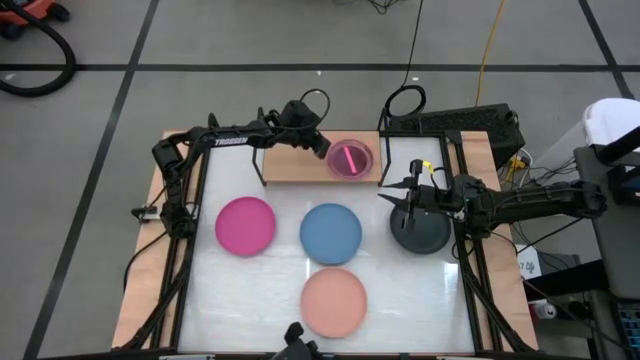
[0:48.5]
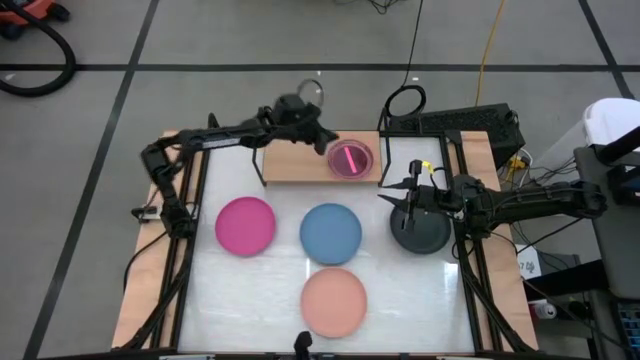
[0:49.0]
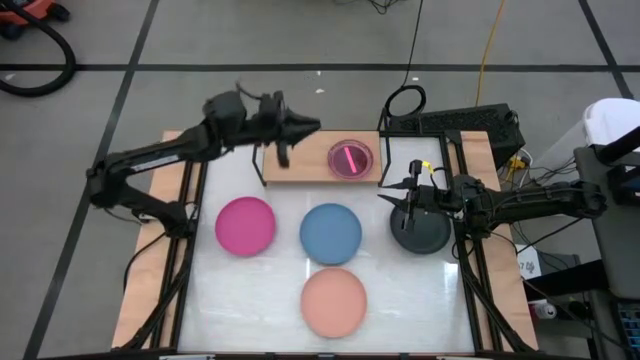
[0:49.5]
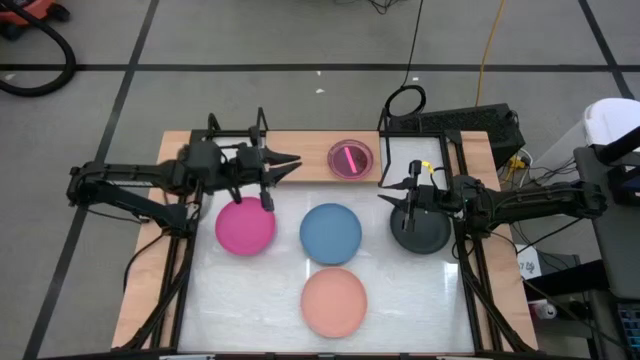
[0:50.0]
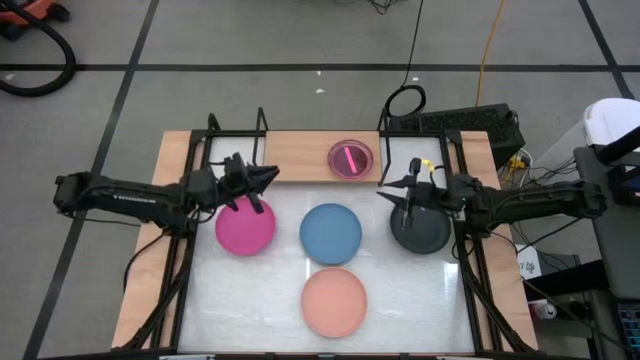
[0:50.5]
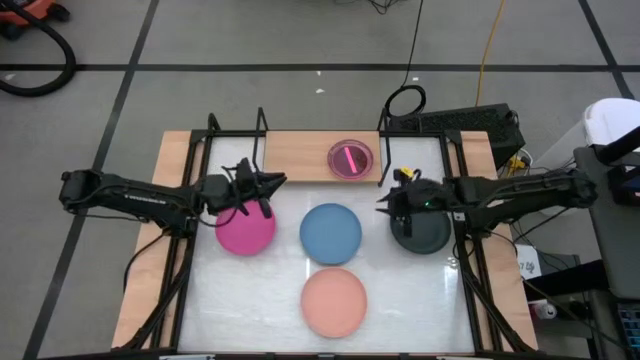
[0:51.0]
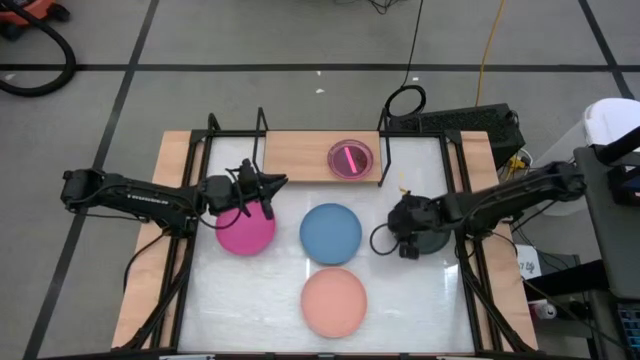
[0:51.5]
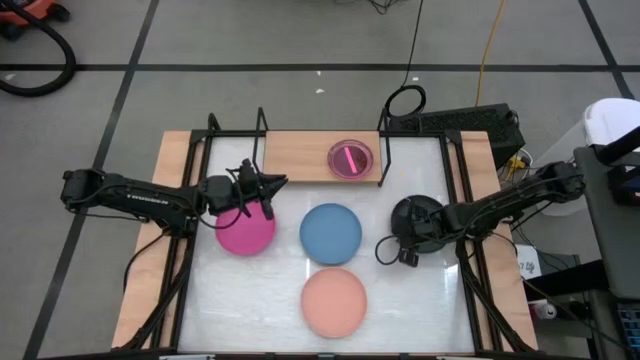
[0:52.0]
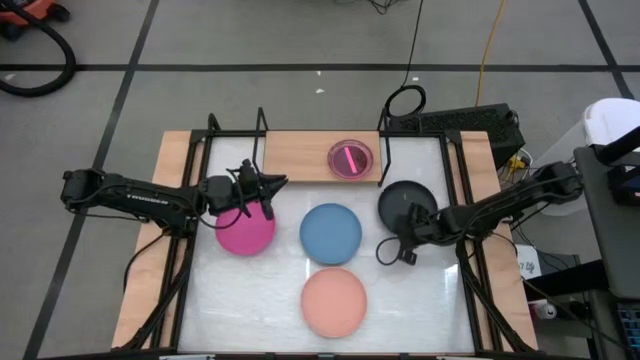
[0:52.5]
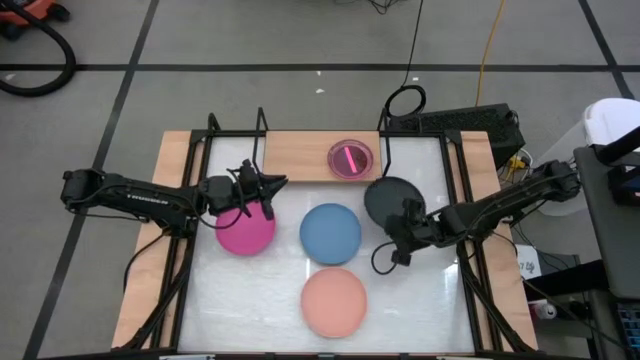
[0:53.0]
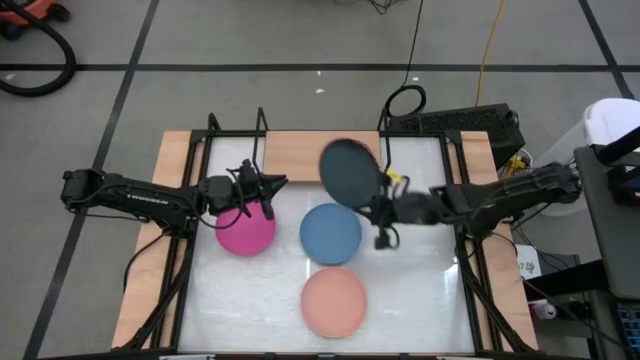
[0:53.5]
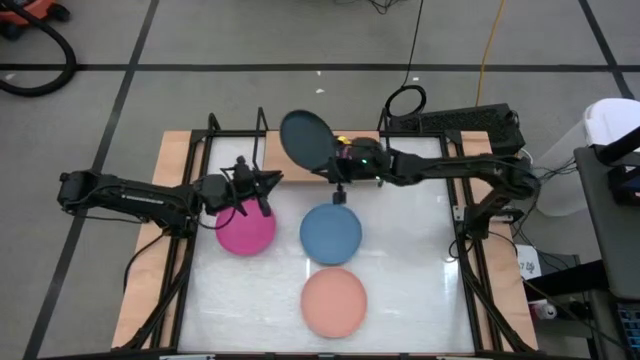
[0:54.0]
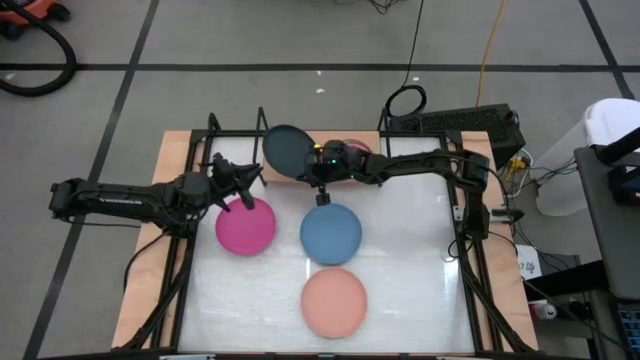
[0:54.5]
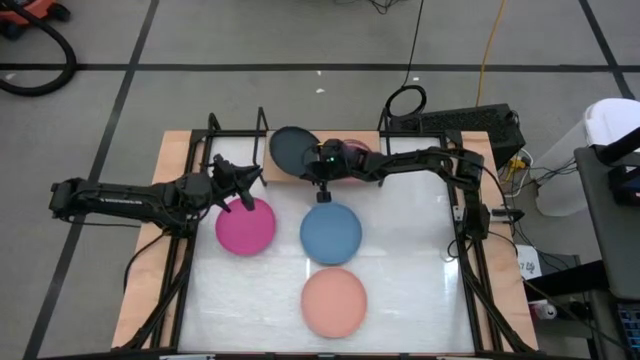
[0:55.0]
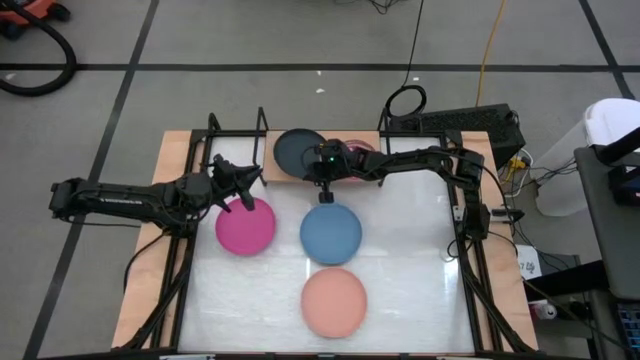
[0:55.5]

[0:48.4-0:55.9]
Task: Place and stack plates onto a shelf
Put the black plate on the shelf

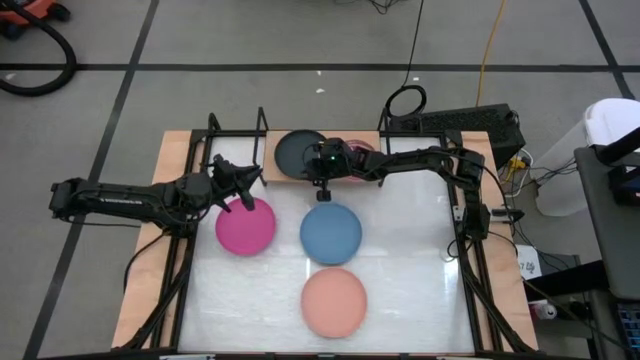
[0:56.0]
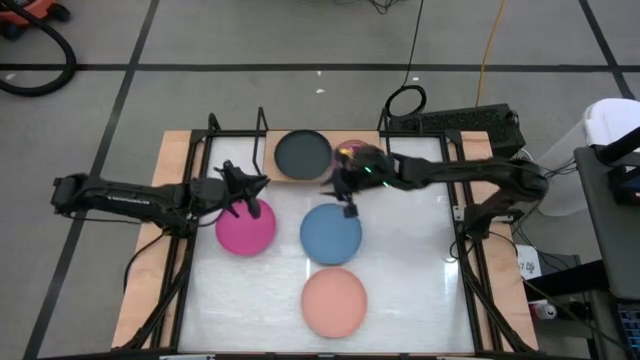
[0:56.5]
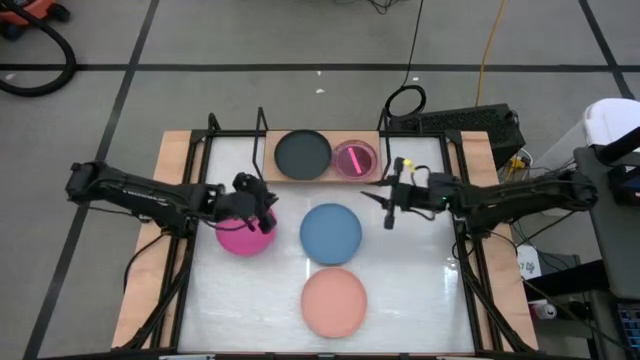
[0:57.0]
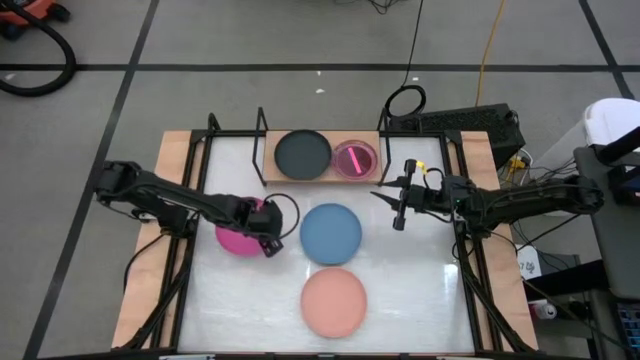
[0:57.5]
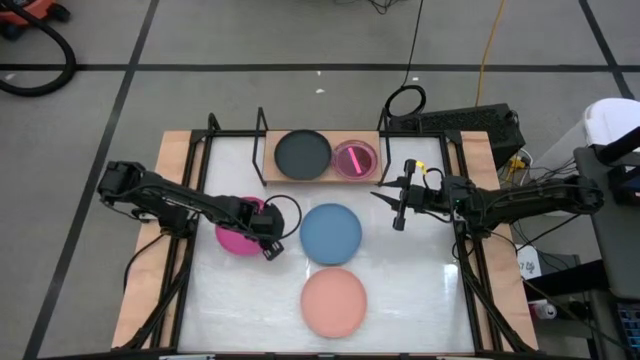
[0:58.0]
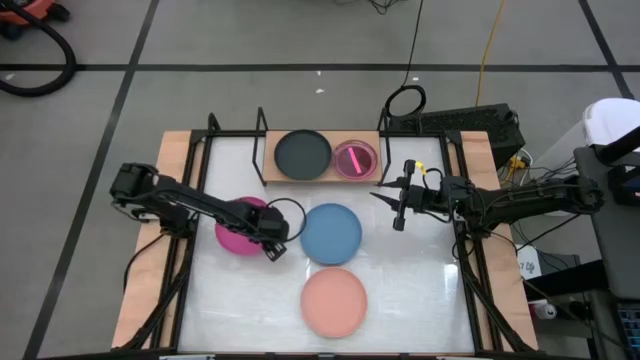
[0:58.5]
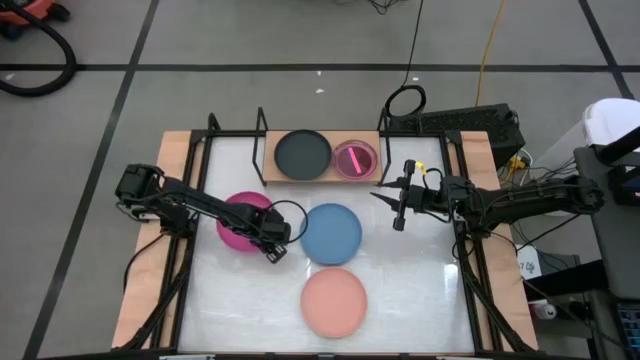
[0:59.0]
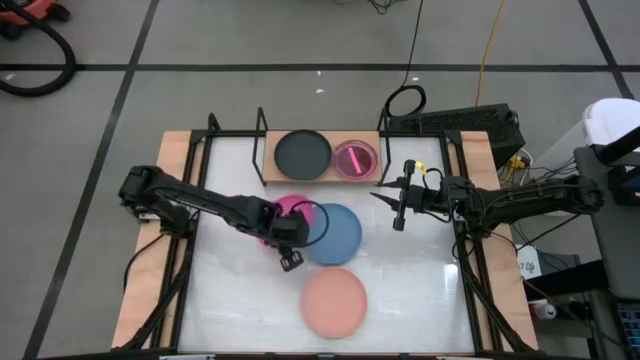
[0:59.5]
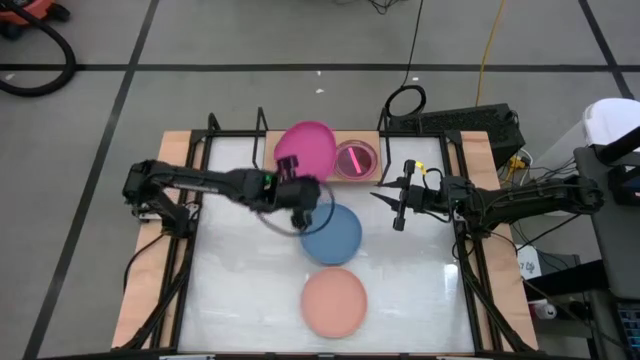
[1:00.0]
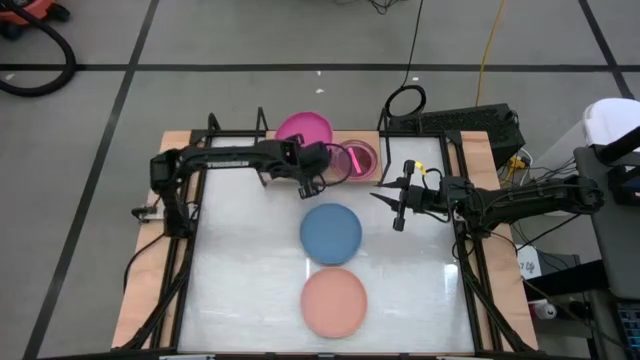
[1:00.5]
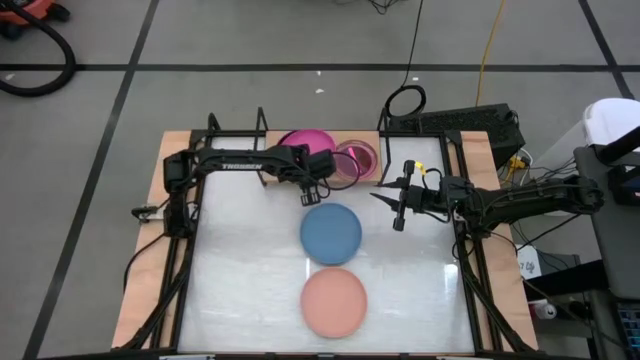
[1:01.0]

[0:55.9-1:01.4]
Stack the pink plate on the black plate

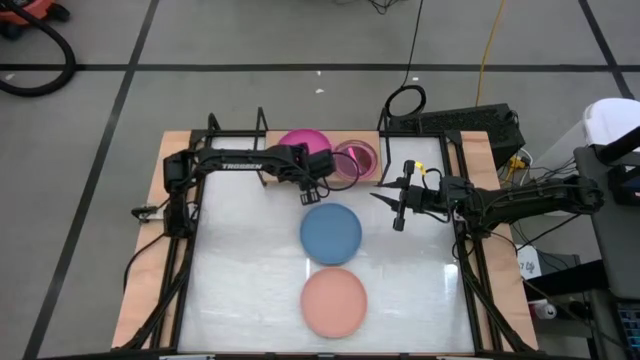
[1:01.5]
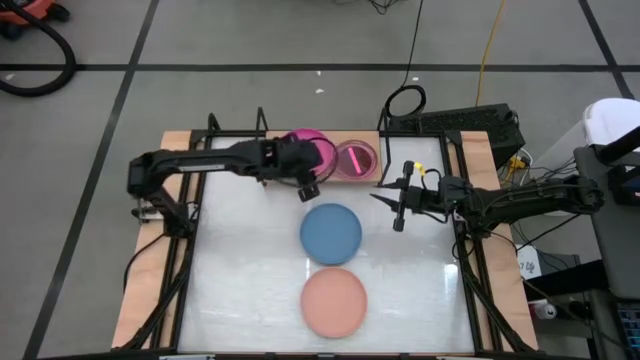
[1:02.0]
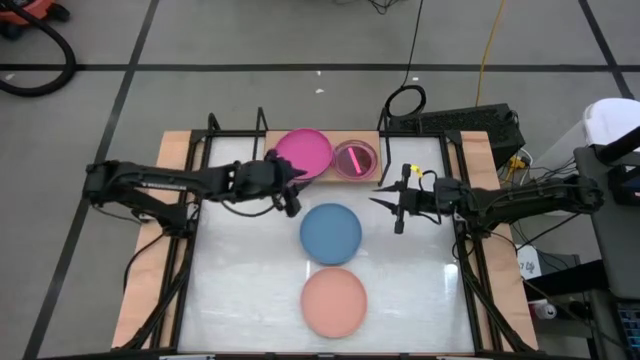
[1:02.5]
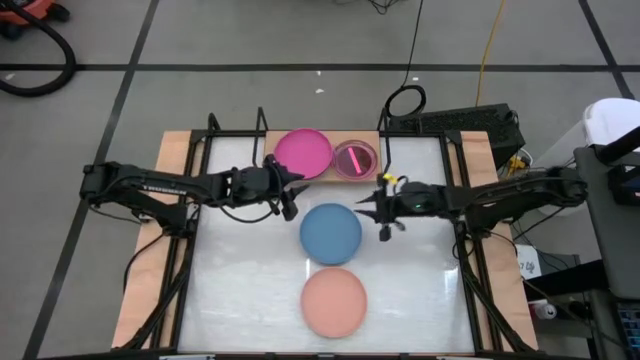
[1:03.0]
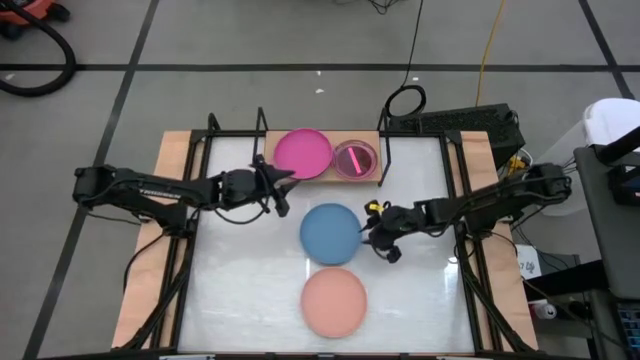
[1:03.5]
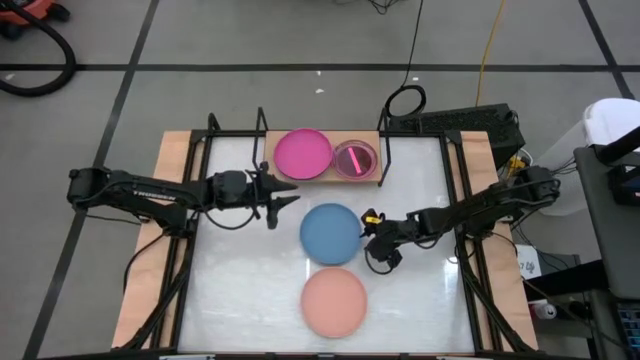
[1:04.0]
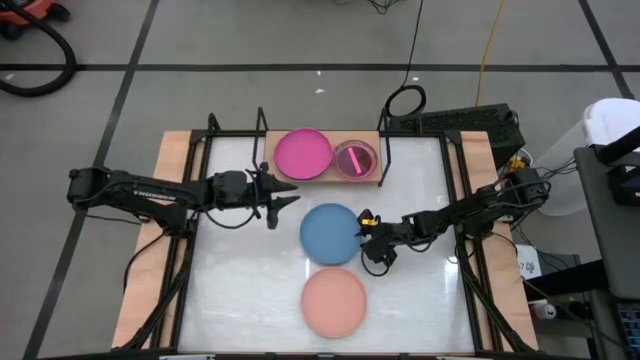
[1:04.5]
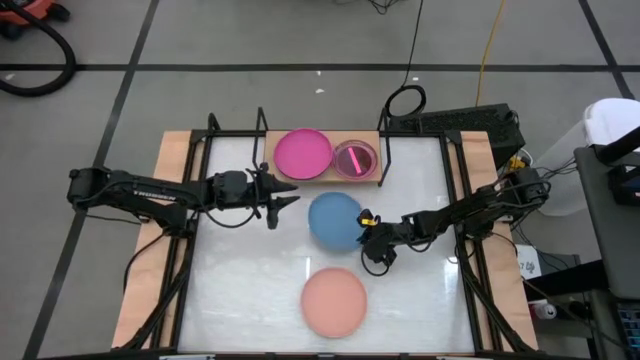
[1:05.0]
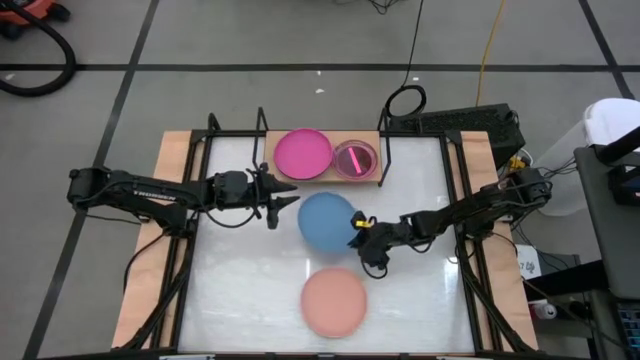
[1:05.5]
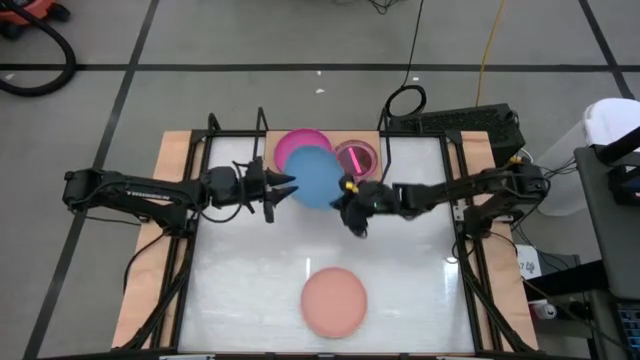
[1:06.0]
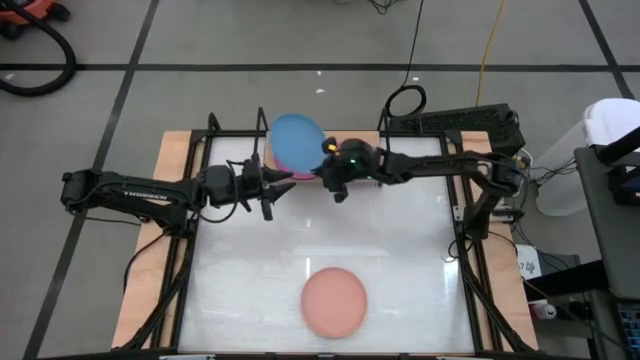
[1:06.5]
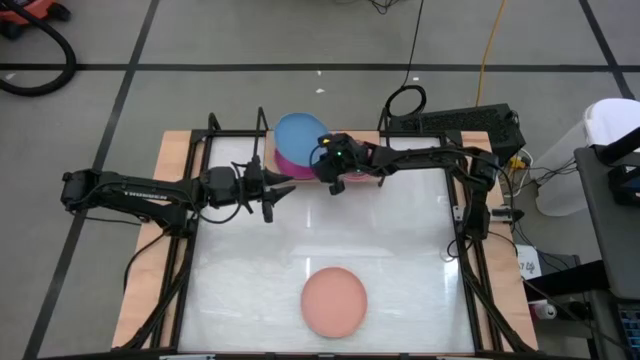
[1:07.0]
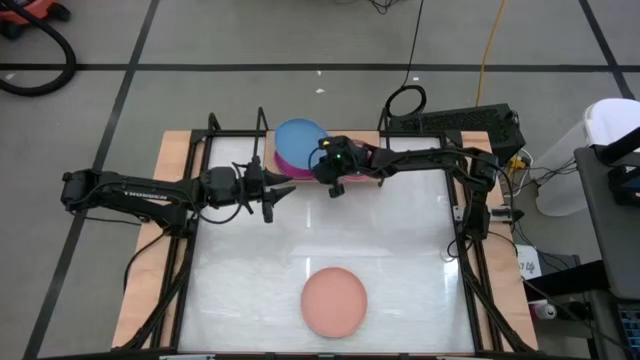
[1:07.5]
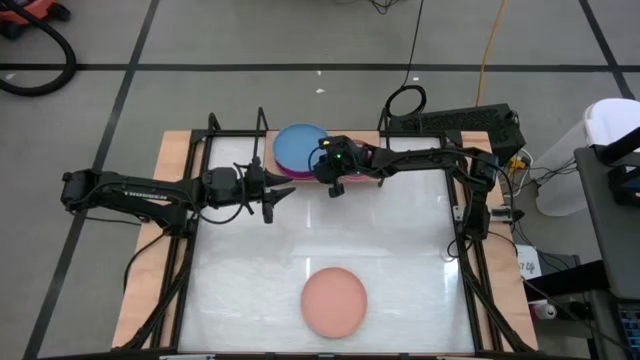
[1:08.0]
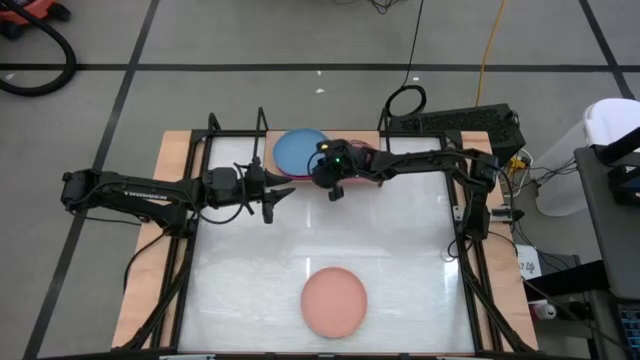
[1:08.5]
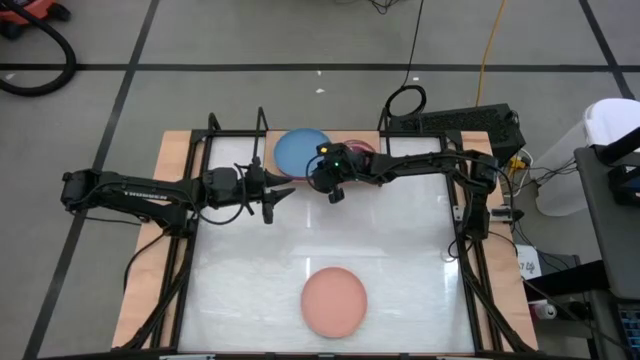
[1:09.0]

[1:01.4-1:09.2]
Stack the blue plate on the pink plate
